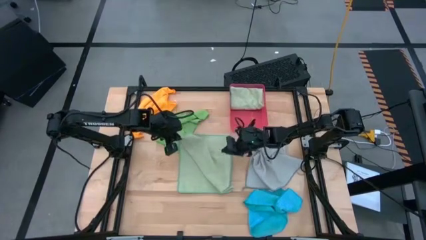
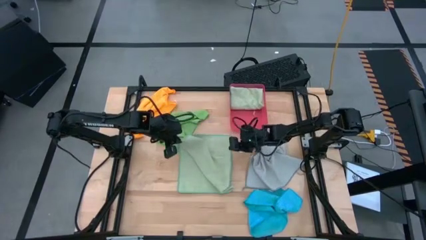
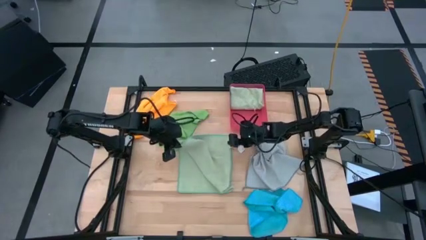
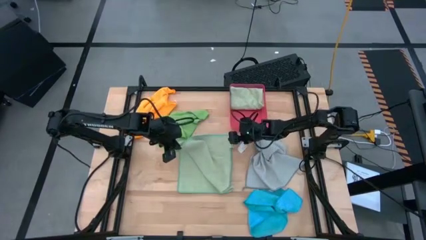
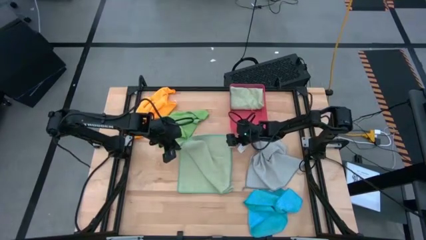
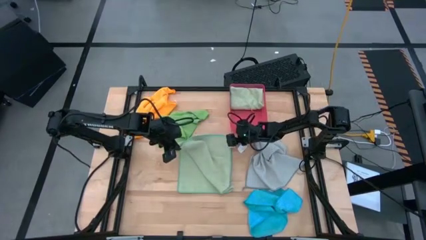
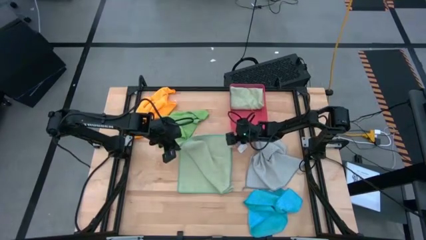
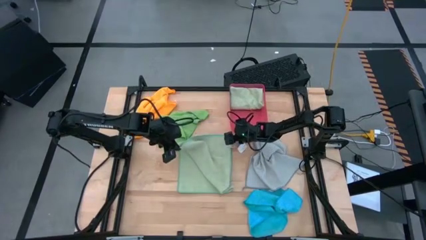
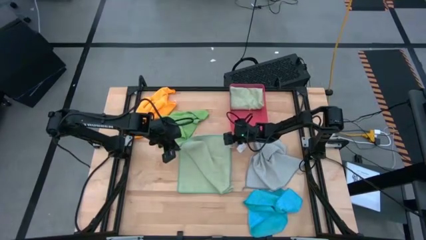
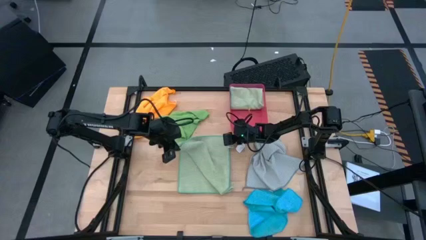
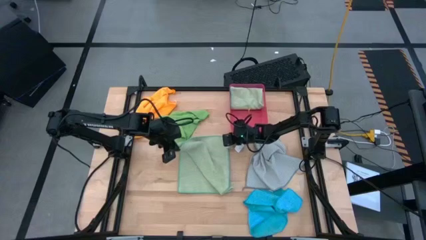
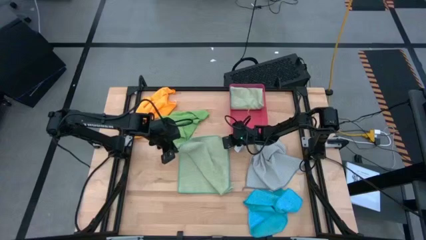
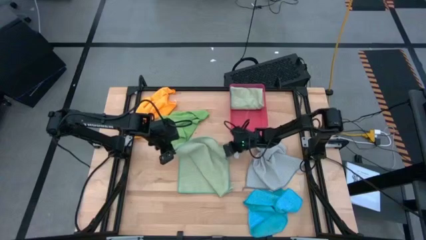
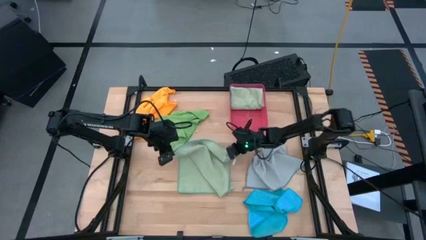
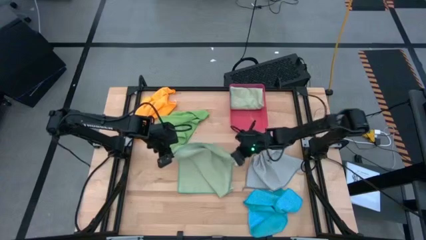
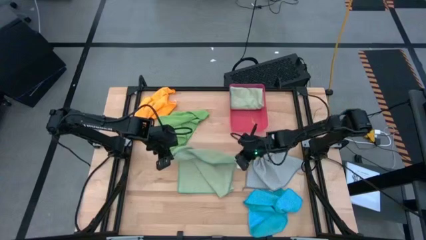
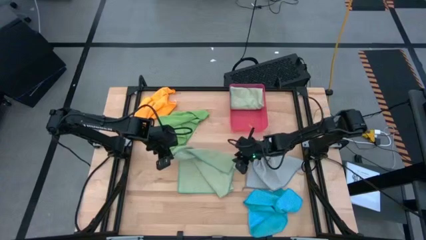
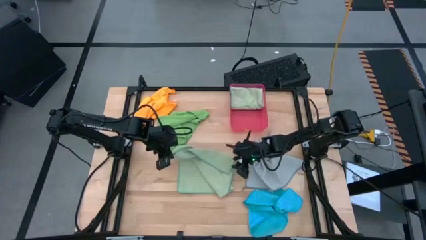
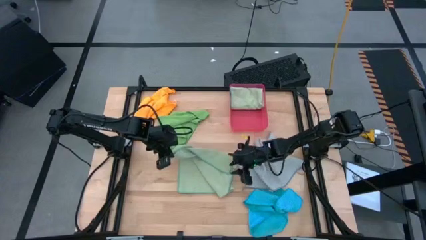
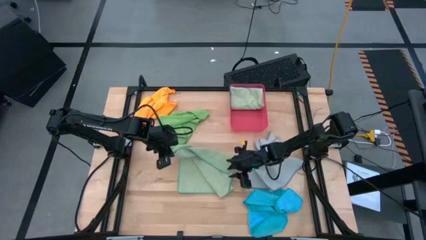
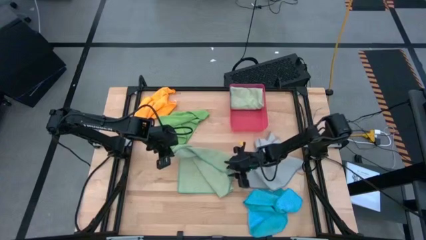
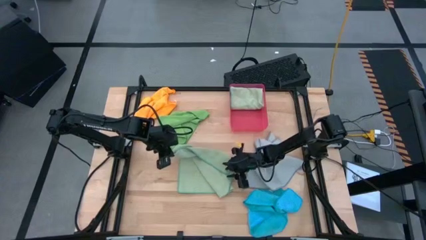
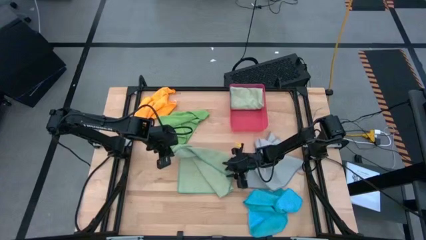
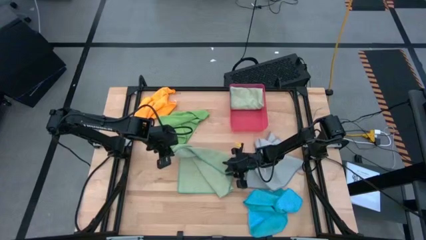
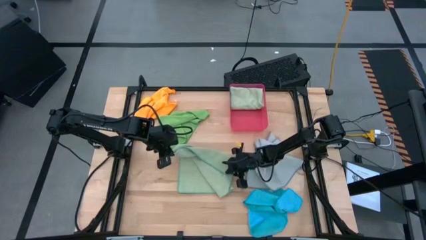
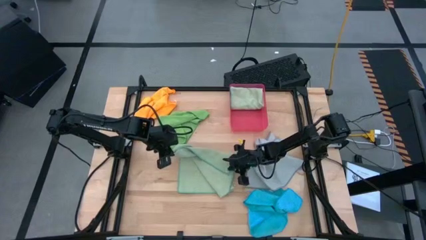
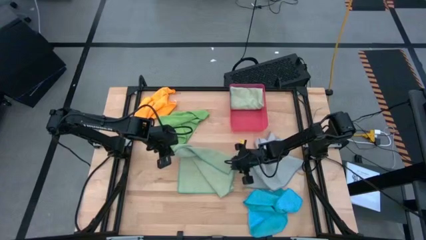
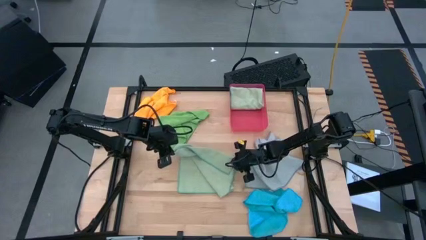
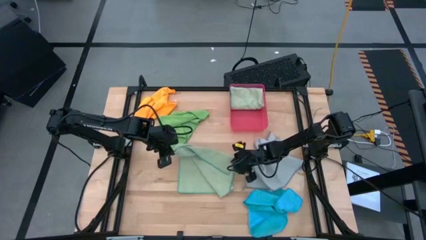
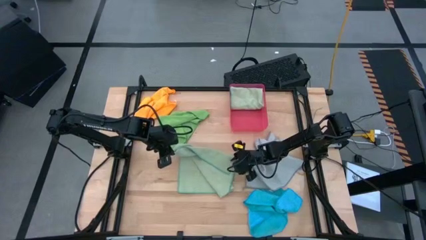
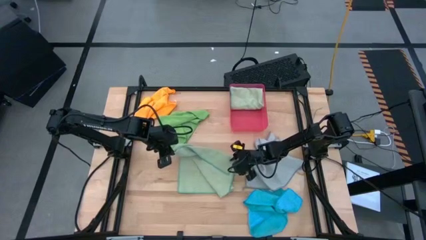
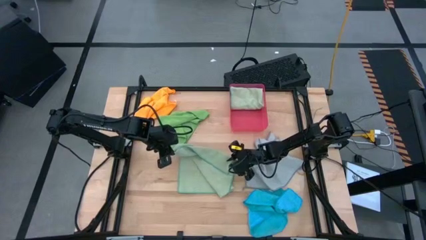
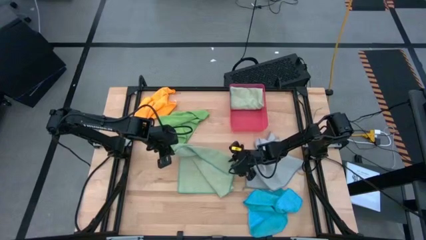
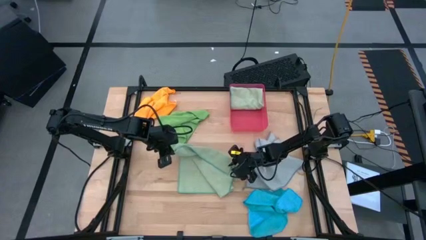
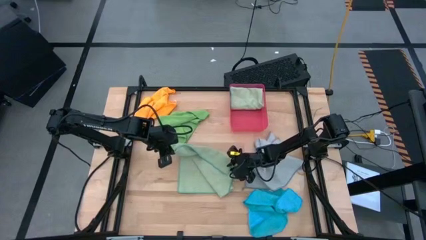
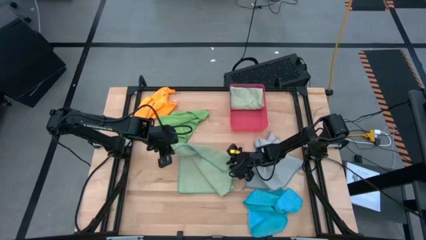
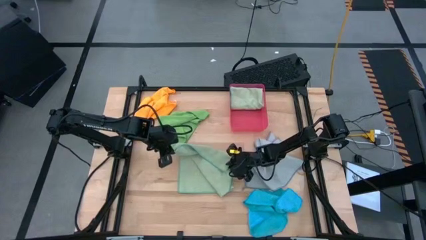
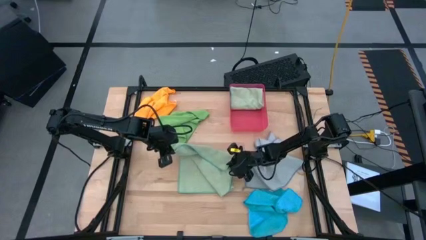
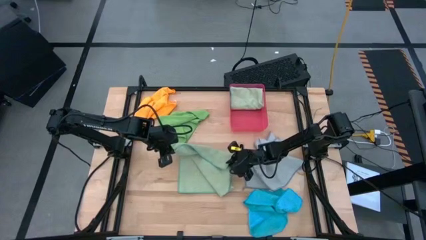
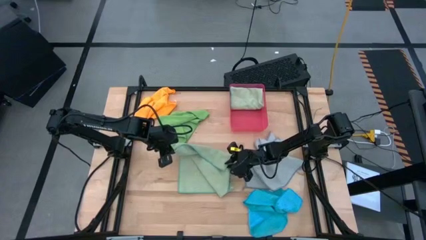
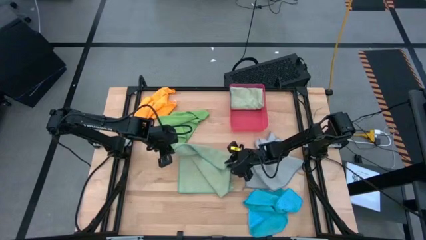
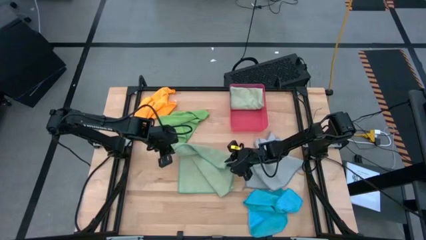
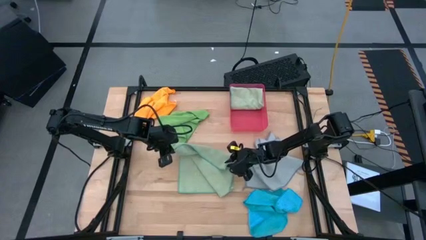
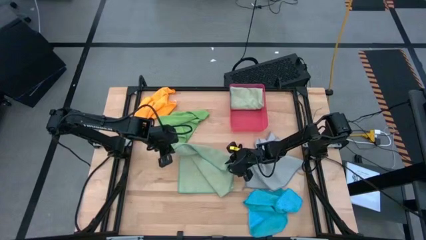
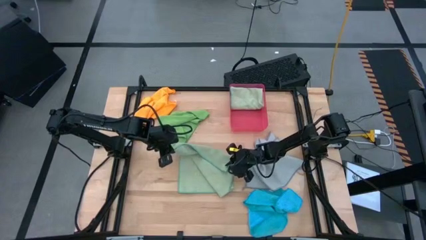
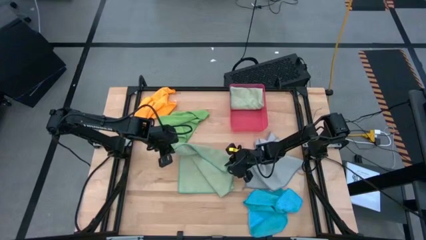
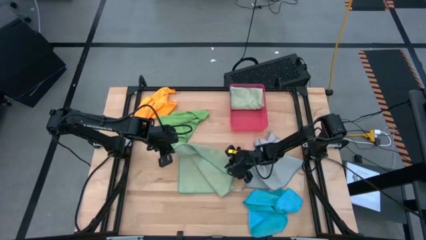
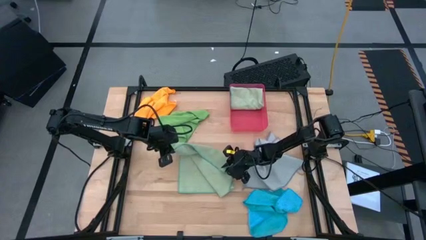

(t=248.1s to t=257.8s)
Task: Fold microfiber towels
Fold the light green microfiber cloth

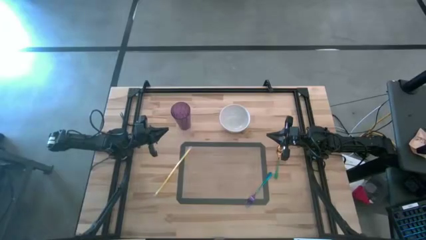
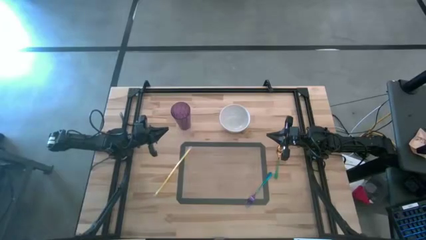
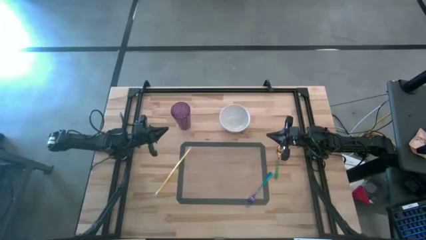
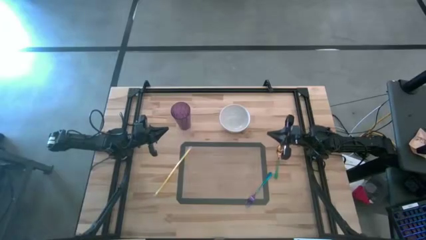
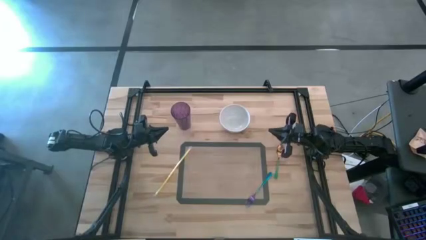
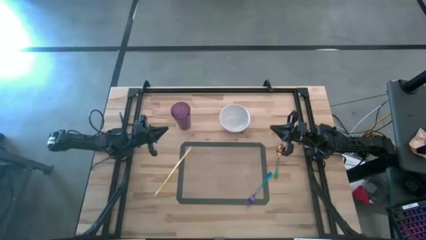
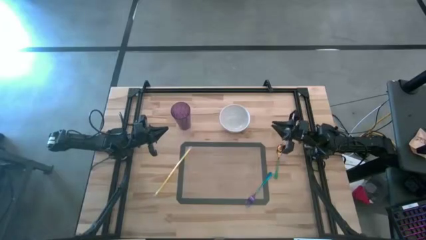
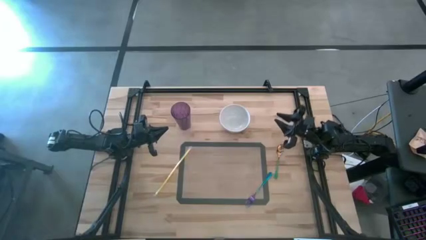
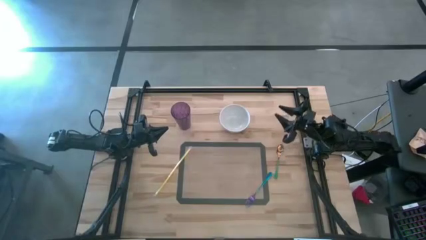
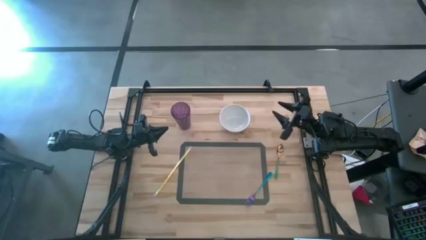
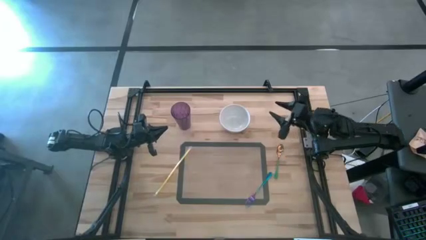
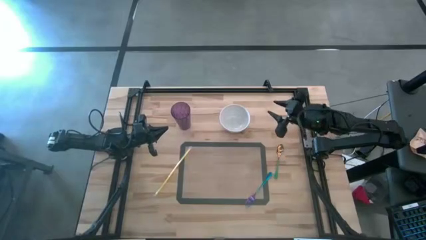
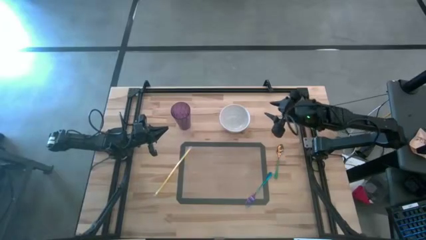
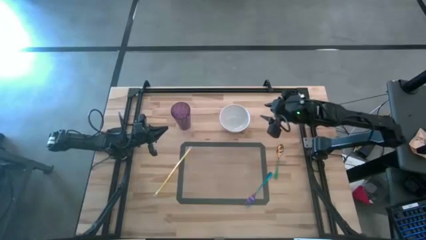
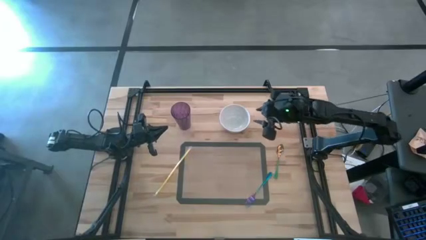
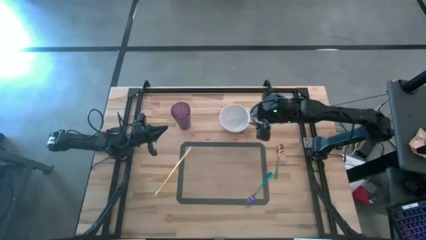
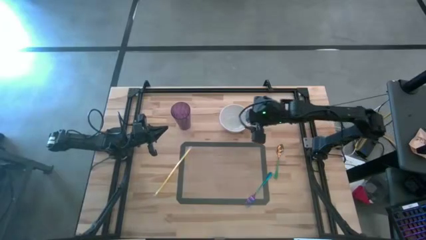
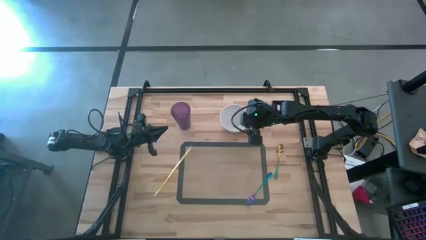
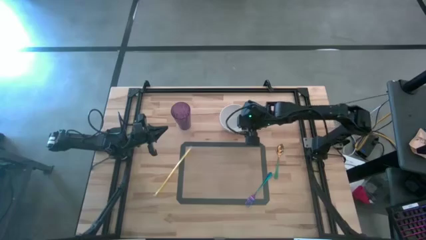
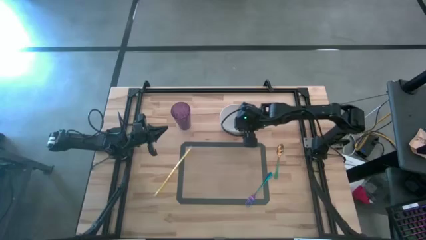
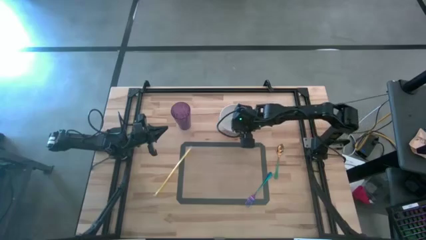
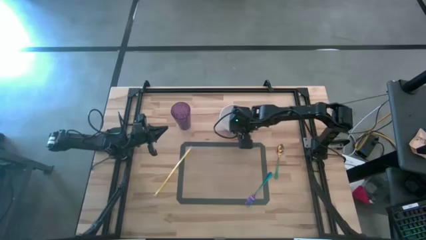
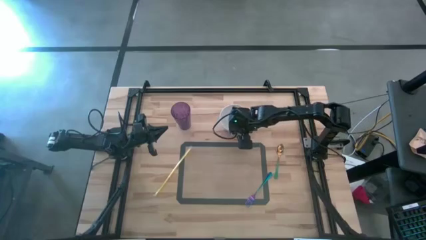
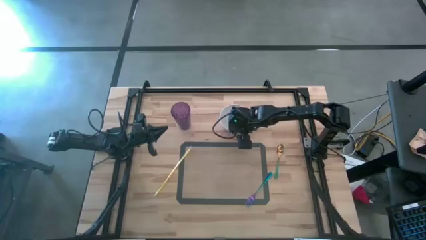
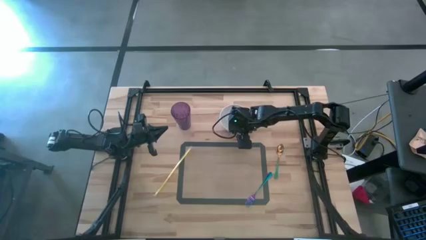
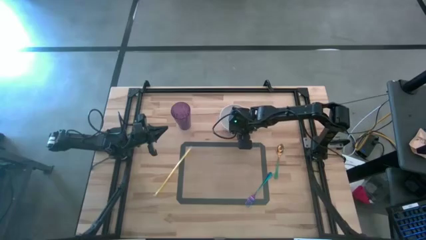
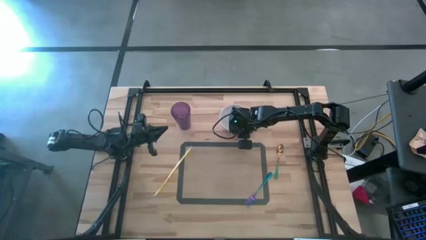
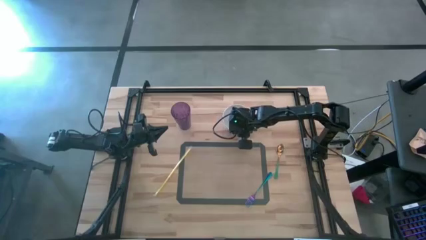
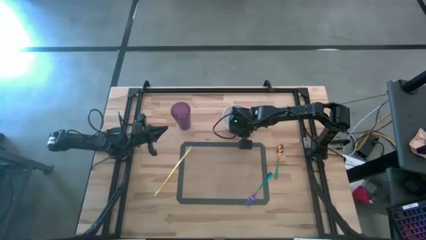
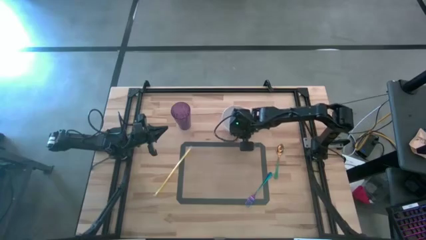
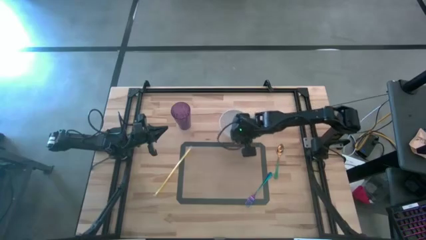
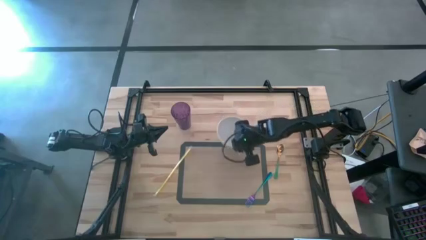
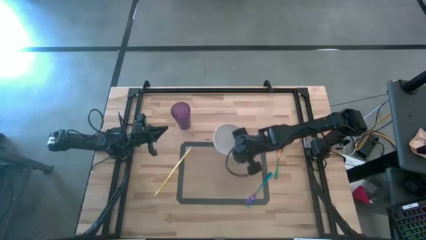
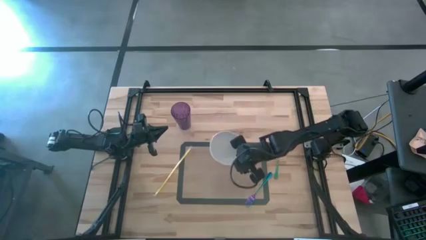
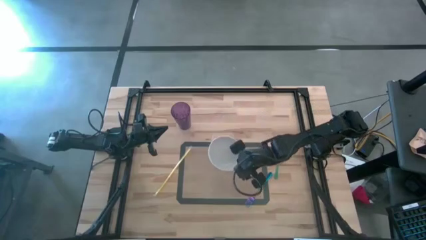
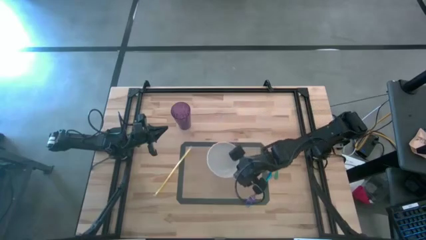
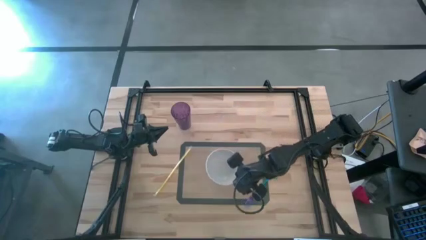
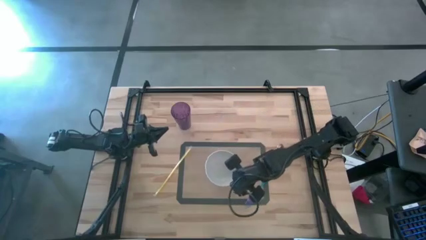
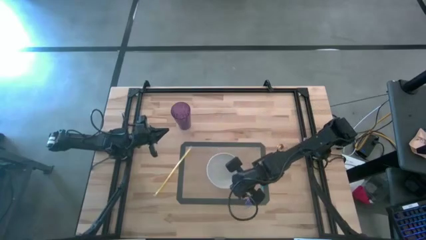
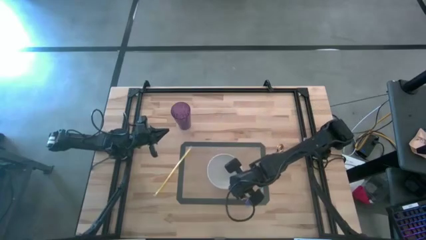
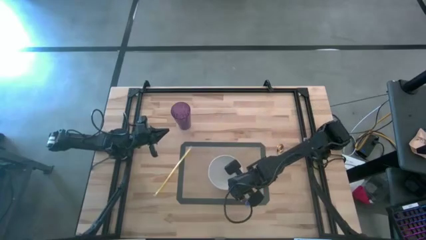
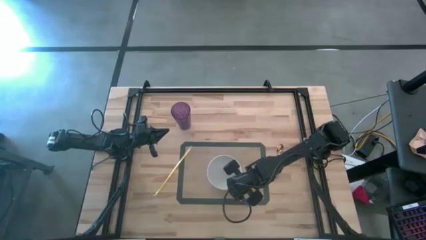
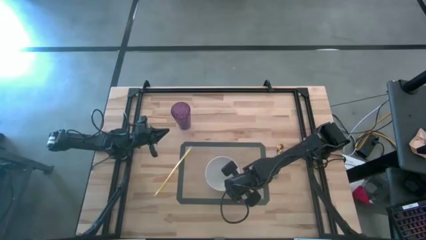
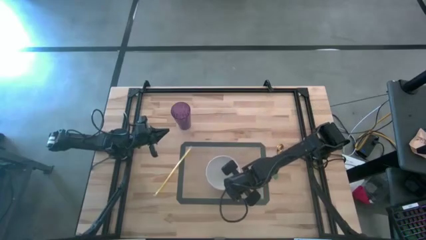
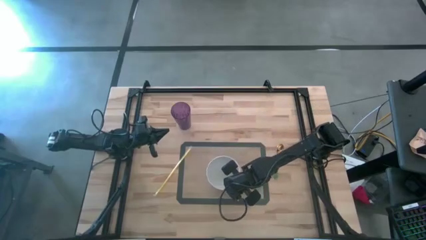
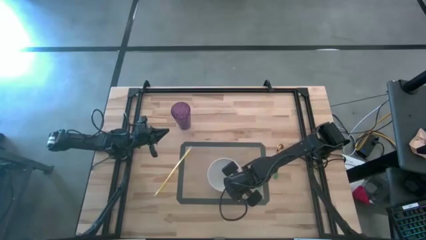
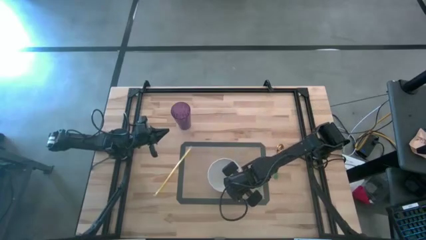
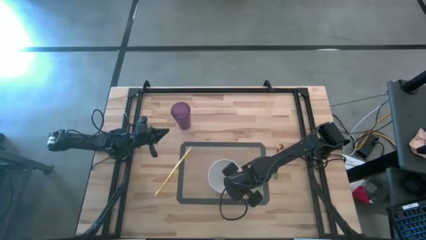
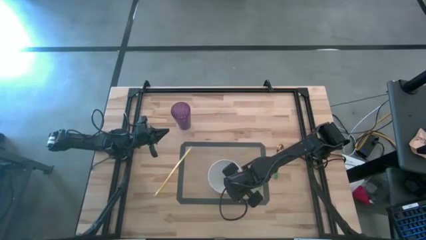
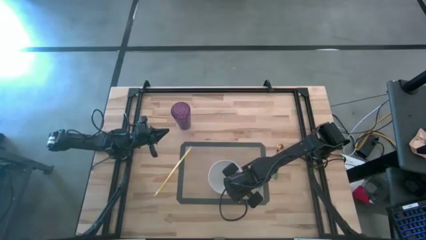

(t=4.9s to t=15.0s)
Task: Pick & Place Utensil
Put the white bowl on the transparent mat
